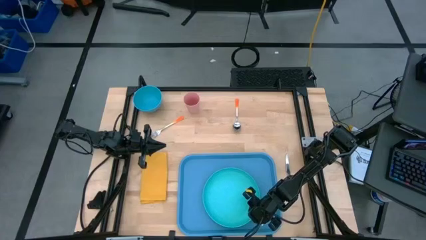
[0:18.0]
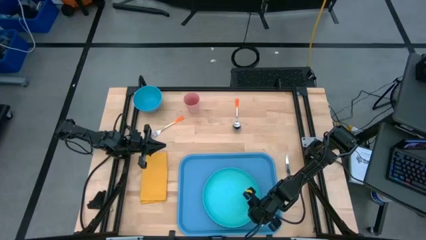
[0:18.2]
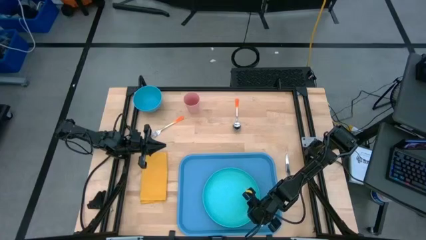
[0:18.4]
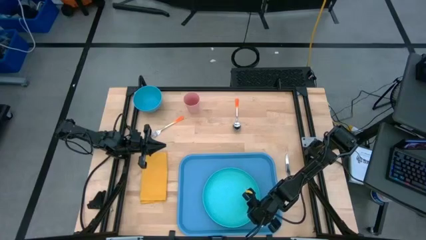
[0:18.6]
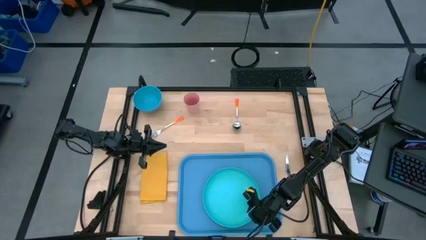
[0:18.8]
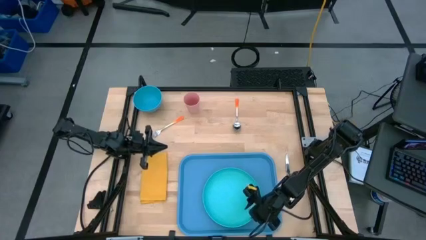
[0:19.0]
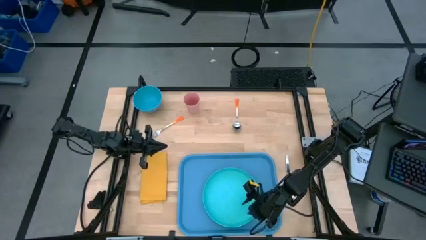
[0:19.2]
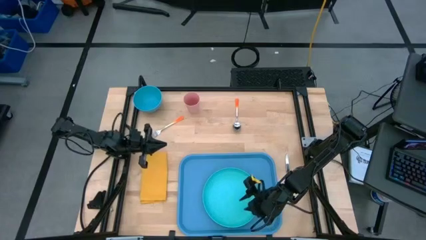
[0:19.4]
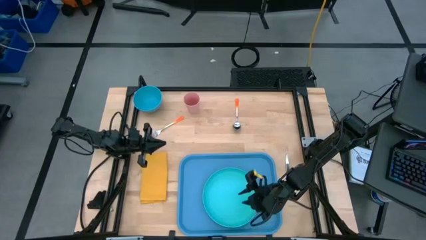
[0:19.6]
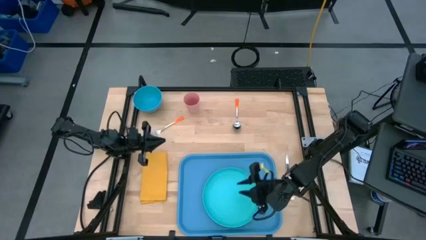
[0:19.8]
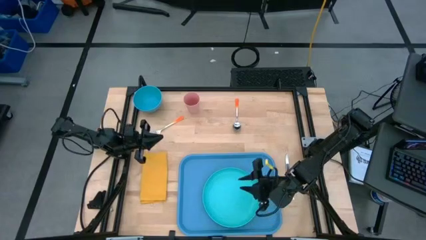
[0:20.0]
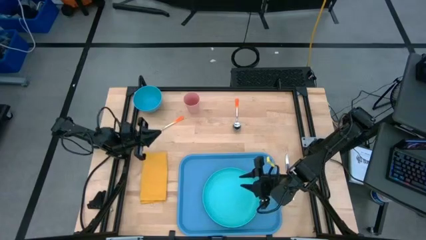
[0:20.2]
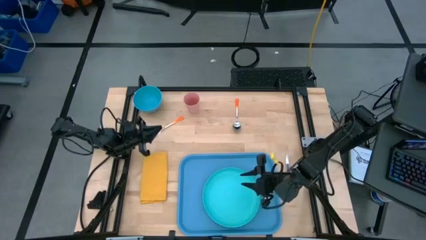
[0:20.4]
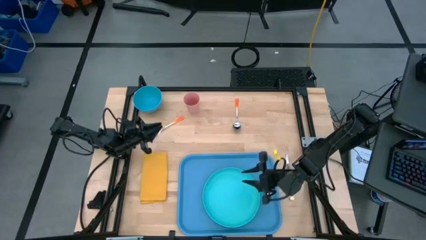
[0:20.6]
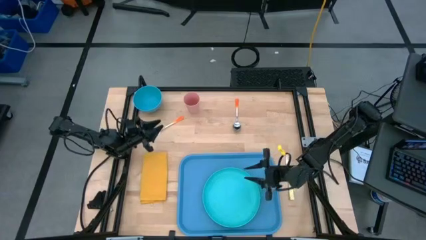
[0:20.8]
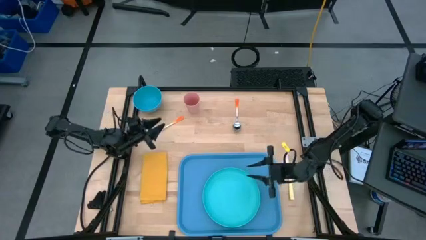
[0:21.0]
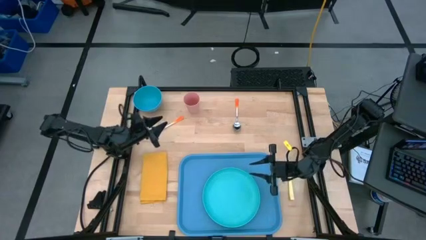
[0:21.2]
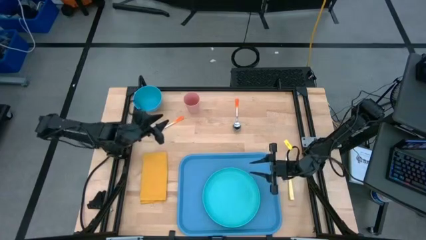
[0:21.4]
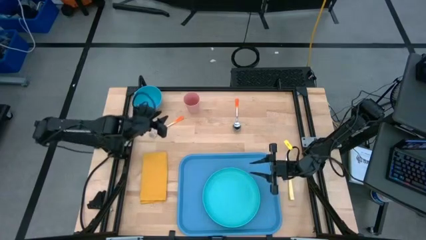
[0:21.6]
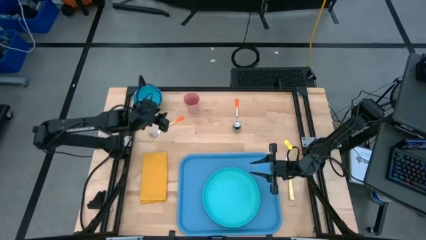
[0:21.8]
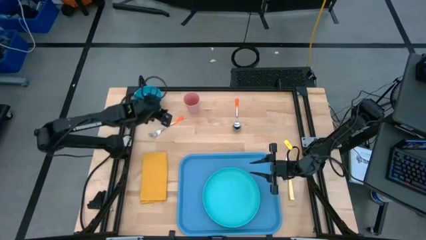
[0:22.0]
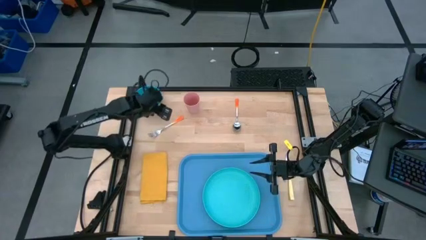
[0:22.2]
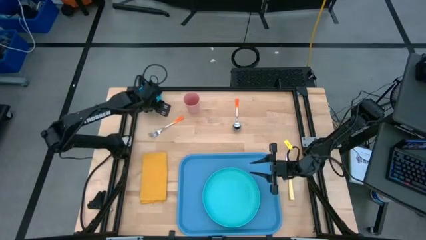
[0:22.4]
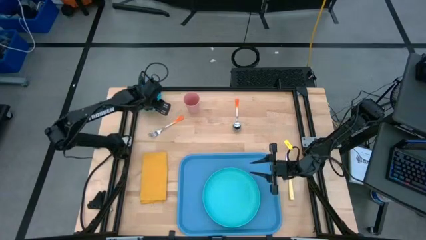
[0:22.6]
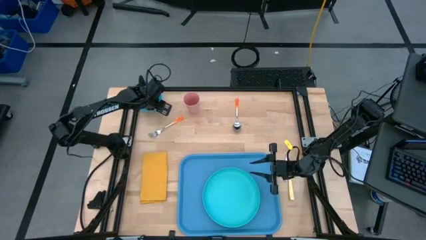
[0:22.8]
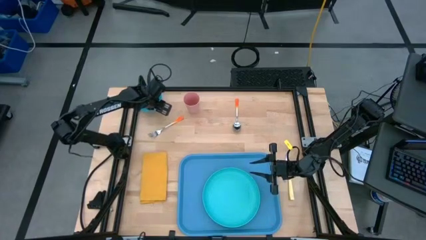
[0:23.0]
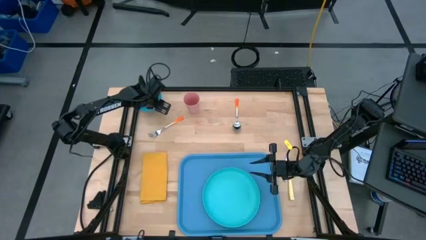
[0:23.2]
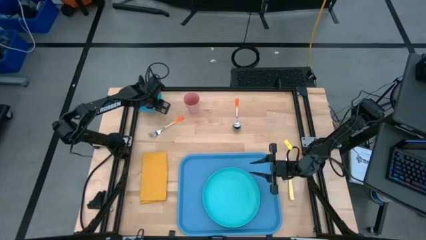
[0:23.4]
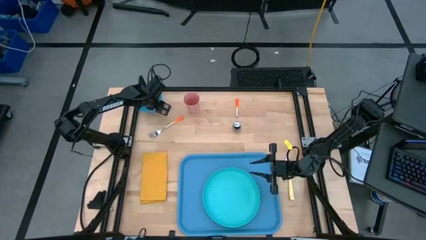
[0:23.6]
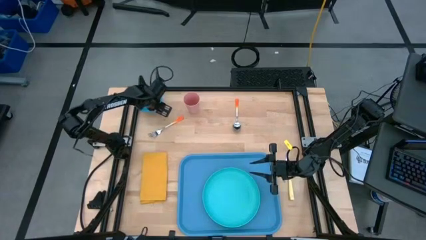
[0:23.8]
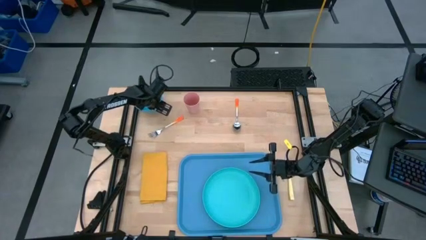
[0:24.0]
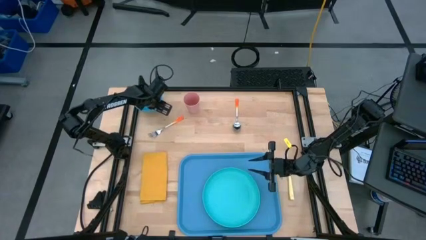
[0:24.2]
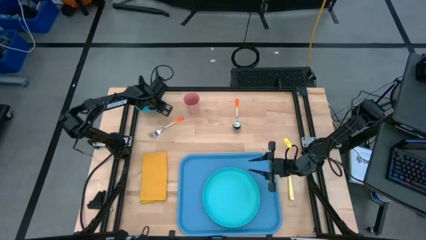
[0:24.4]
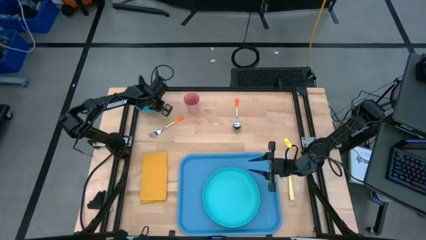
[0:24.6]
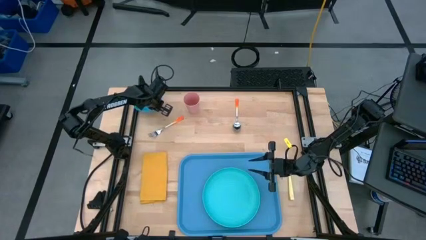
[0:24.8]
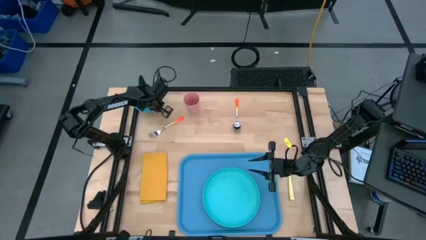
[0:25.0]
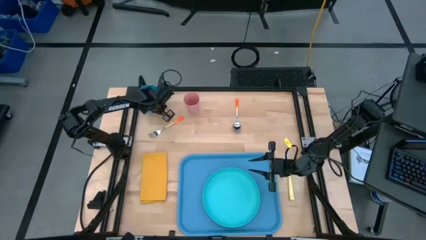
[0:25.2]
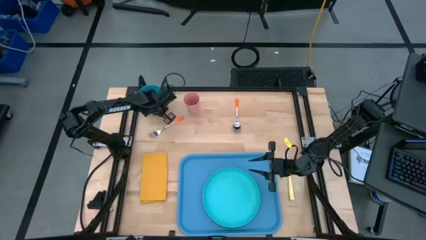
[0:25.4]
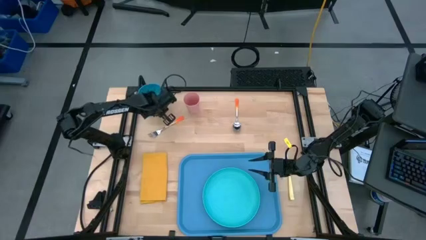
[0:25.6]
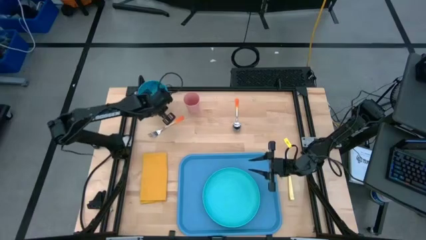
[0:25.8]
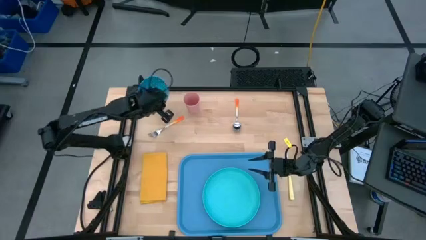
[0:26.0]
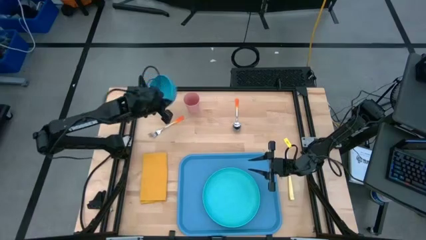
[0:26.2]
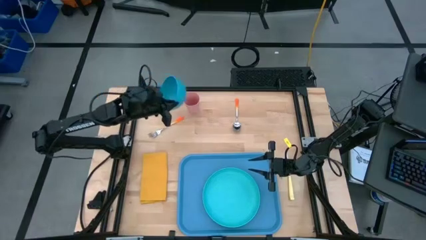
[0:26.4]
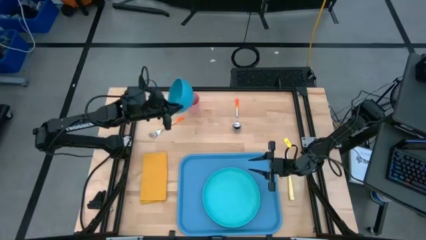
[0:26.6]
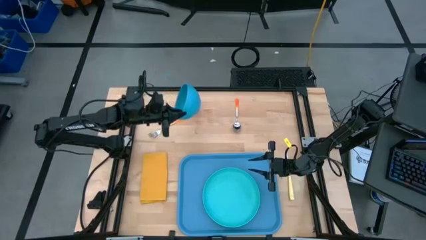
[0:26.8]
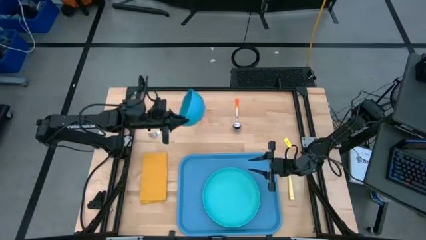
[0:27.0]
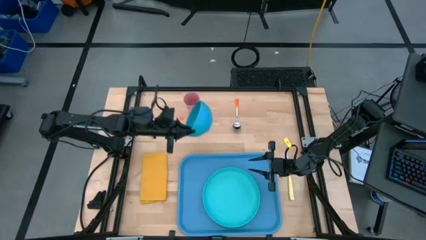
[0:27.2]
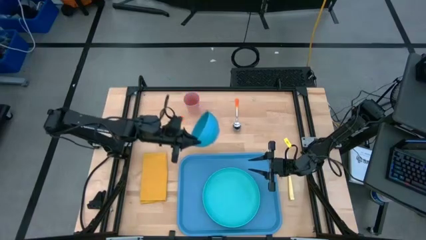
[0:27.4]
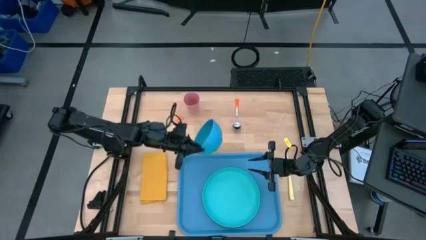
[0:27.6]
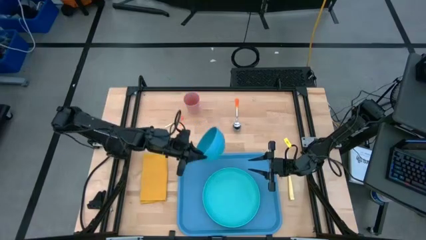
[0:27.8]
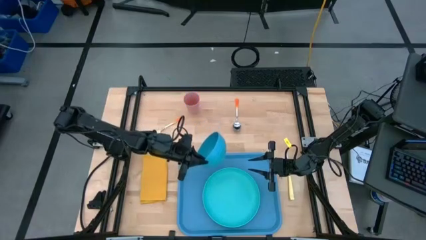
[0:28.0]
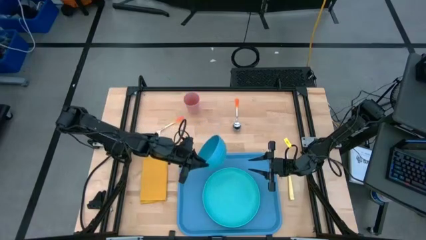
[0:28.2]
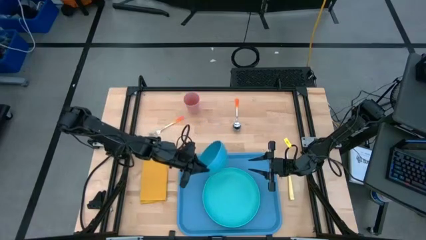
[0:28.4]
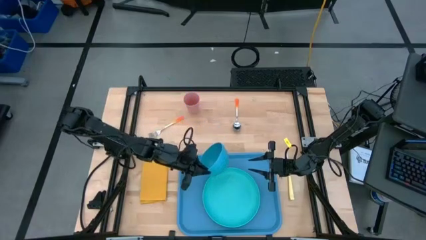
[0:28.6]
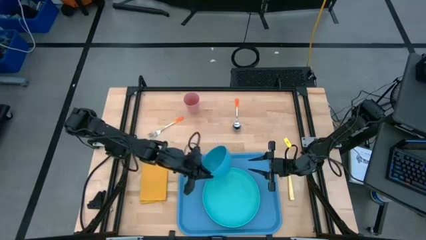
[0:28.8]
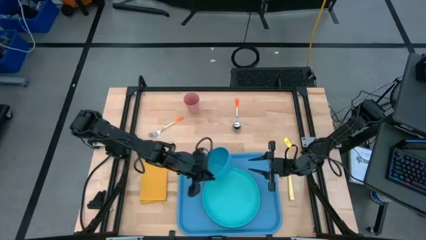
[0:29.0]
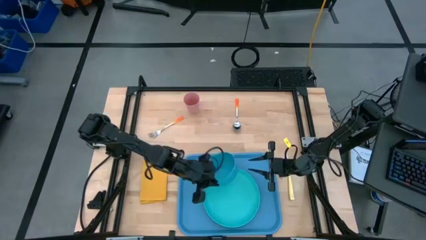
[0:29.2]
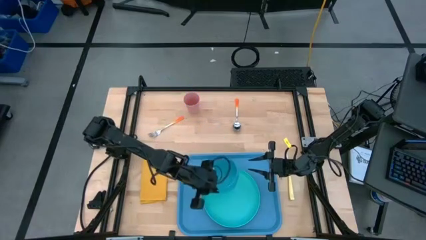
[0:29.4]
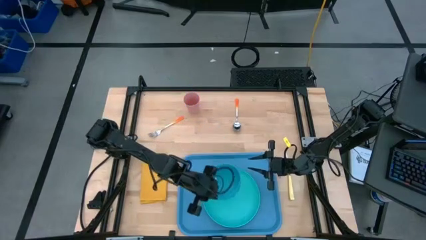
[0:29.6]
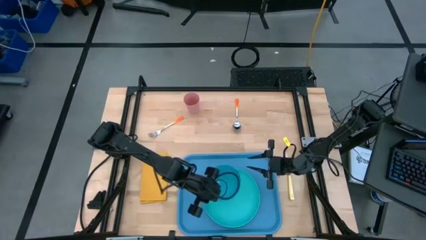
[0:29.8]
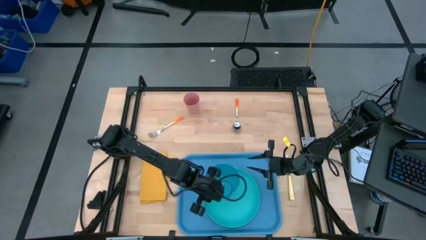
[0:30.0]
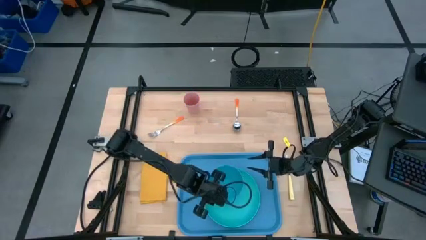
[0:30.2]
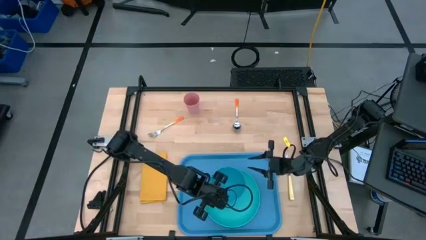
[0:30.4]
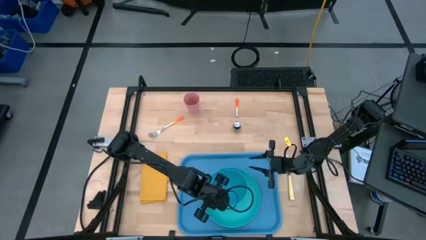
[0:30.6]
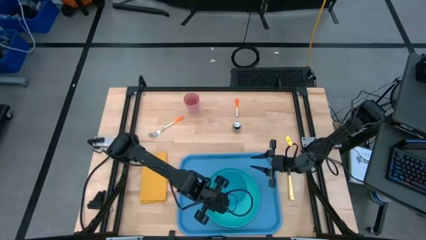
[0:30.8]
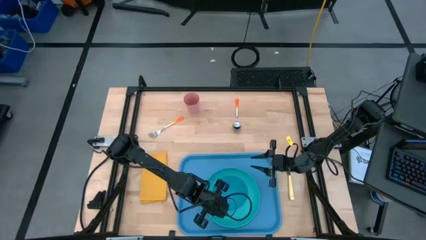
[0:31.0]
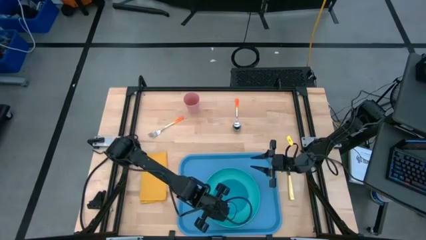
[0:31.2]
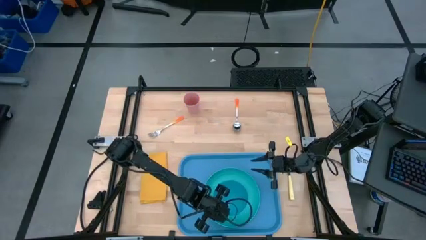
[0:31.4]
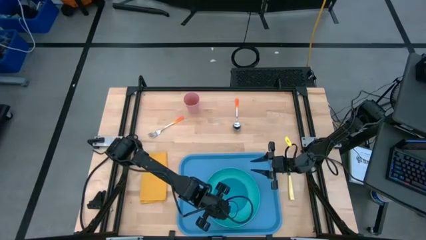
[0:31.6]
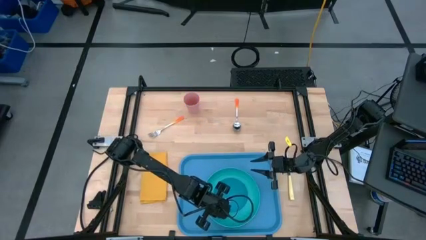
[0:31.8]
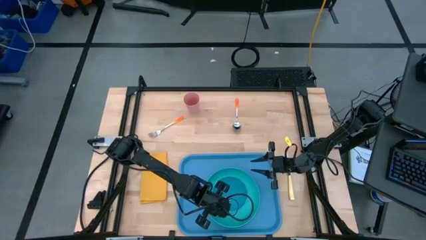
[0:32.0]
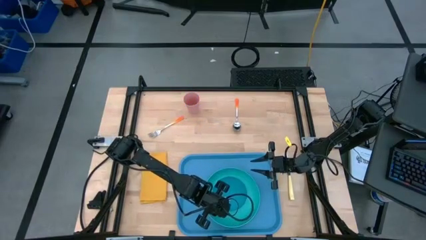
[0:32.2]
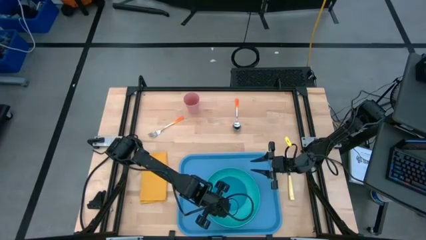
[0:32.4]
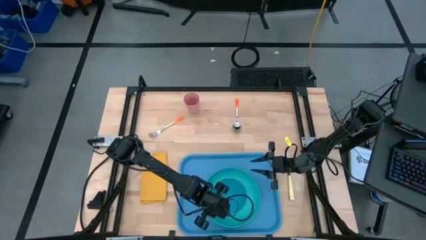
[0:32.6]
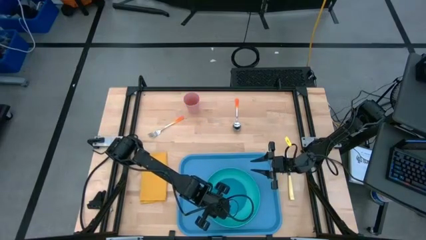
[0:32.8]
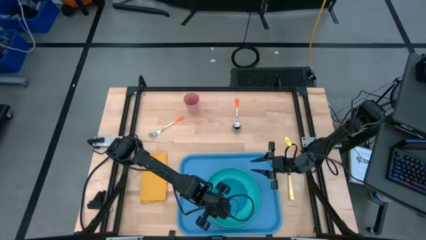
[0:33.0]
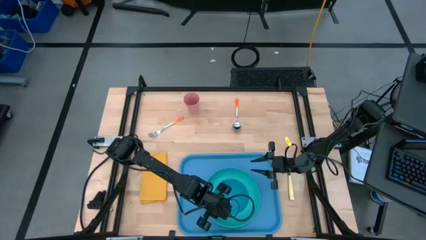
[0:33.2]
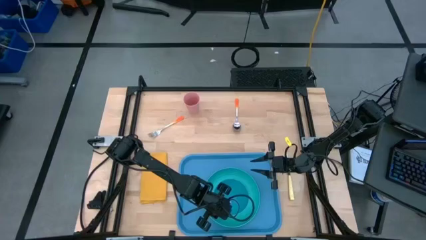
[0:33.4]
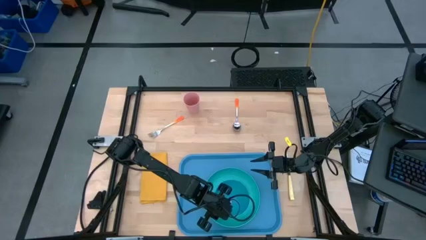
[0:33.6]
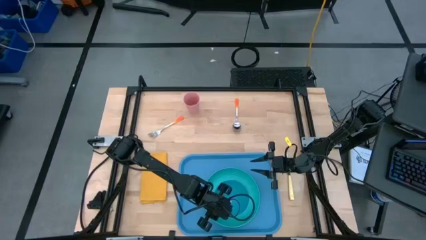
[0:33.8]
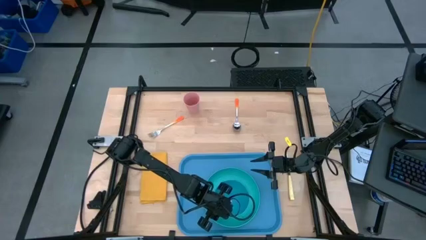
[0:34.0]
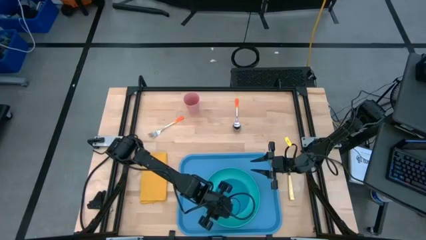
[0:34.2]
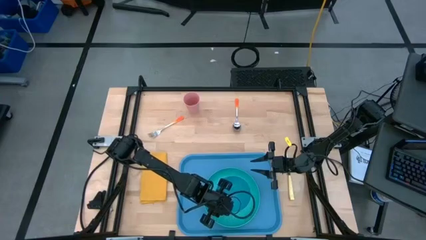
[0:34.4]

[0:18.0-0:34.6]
Task: Set up tray
Put the blue bowl on top of the light blue serving tray
